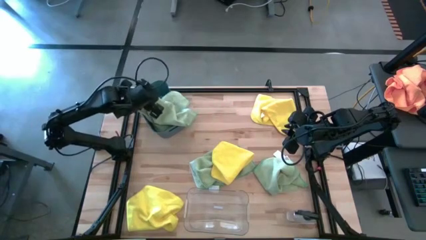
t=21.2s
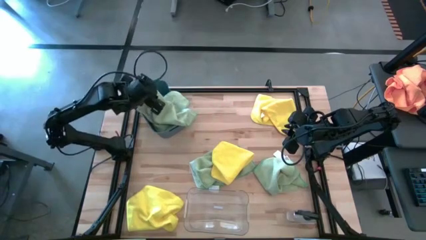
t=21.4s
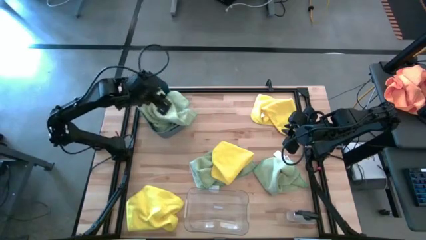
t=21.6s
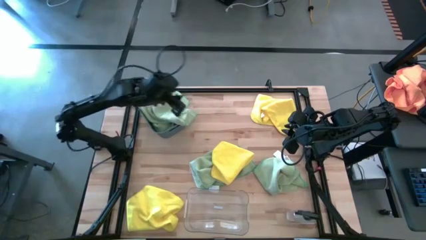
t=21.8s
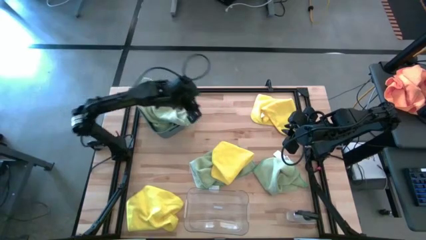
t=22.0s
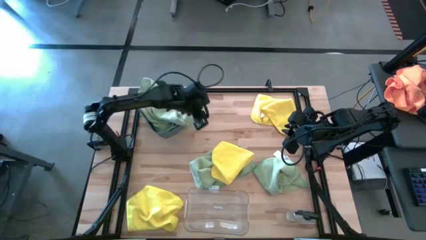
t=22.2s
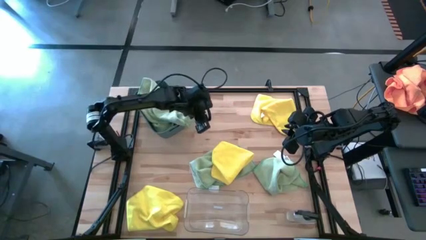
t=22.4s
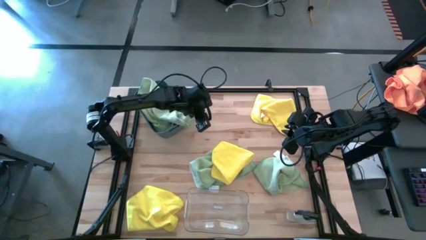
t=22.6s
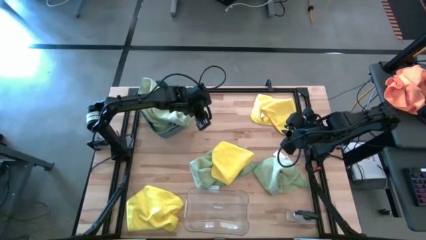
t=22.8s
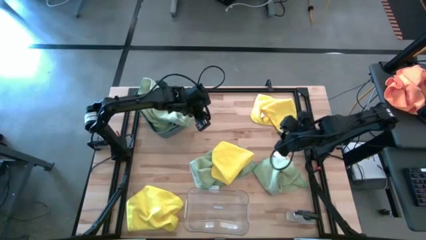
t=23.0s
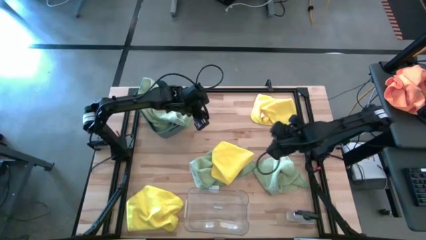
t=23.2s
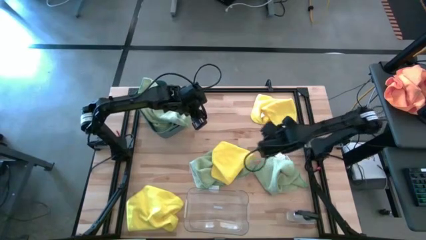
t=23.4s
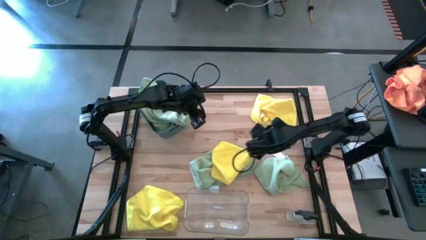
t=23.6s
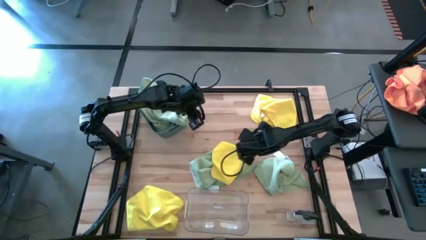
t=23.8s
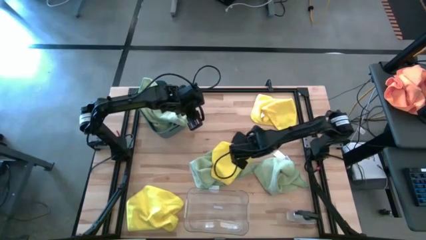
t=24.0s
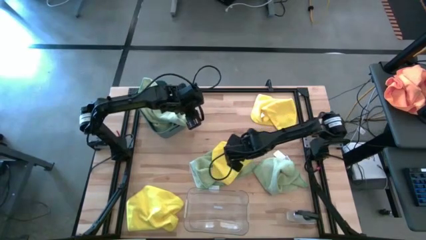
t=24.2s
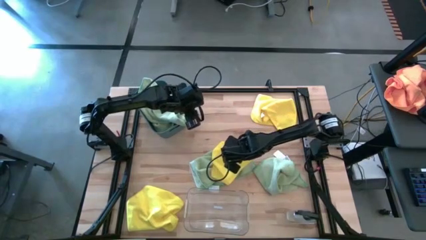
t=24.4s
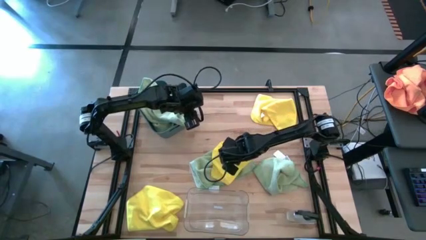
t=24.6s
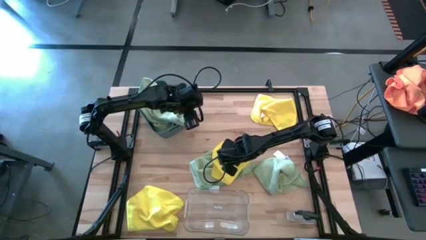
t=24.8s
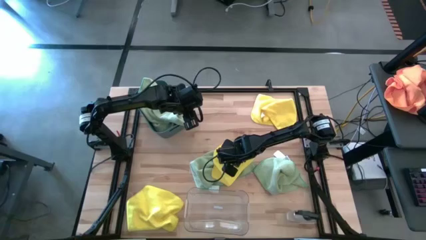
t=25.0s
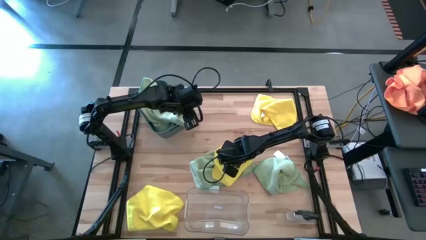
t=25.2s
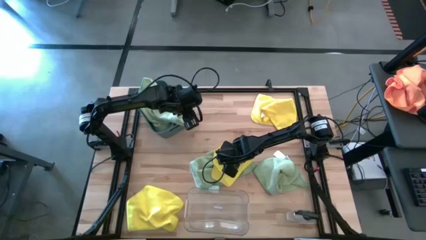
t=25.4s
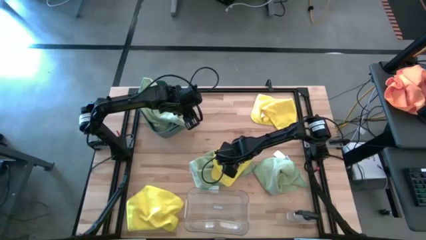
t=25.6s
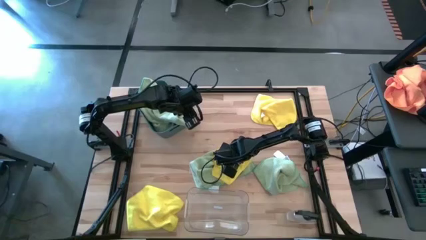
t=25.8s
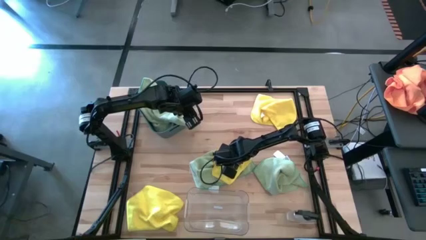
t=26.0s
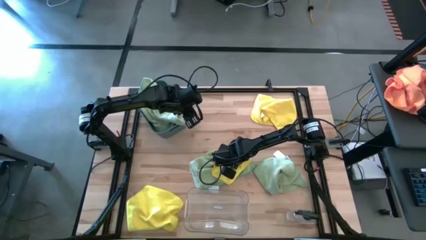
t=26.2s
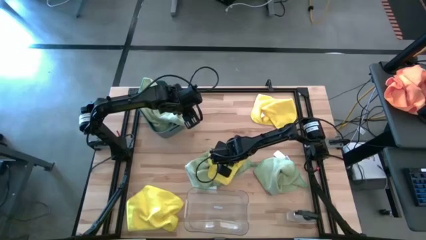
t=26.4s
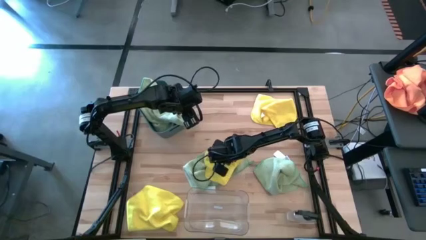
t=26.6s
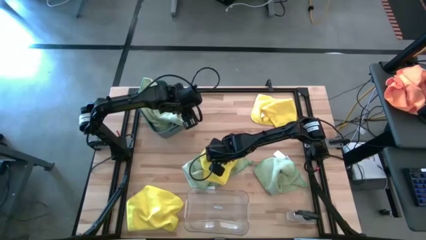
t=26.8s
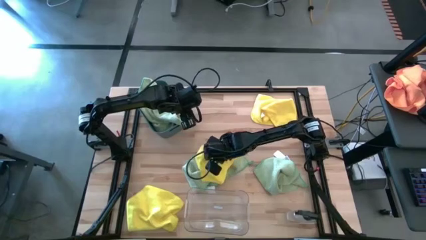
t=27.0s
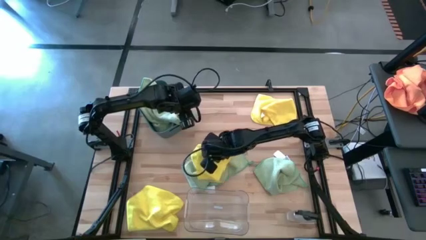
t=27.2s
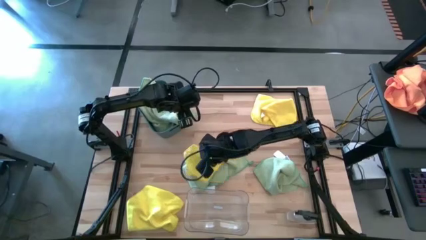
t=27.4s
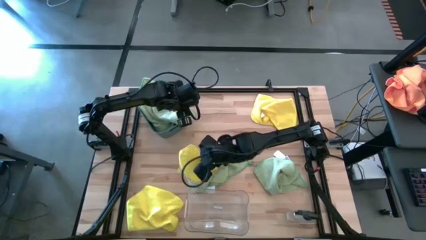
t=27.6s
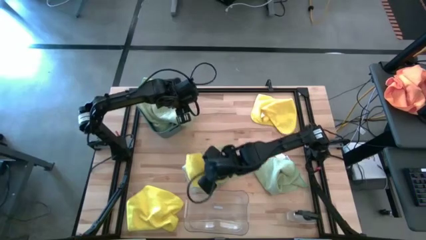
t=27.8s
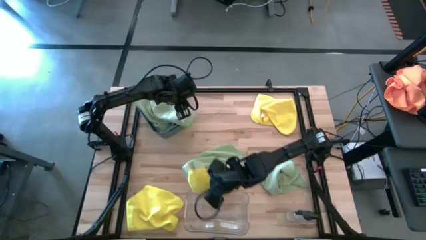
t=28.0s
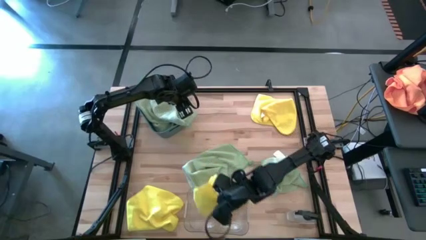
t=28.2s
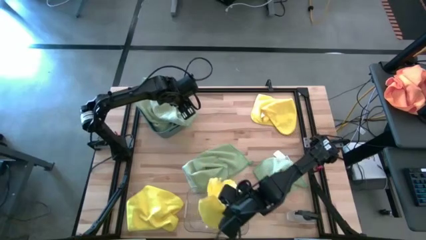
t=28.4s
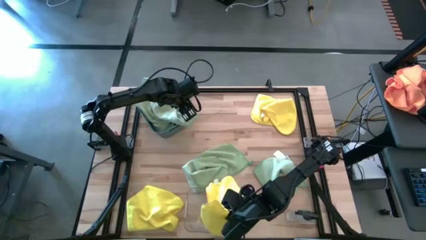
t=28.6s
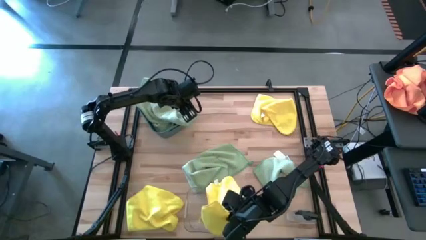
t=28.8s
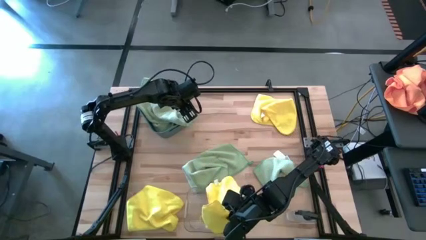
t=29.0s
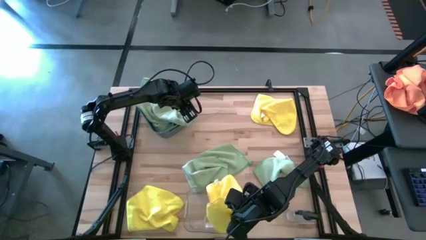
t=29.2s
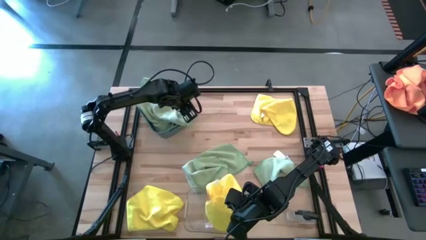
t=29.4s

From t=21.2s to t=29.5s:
Task: Sort microfiber towel by color & place in baskets
Put the center yellow towel into the transparent bin

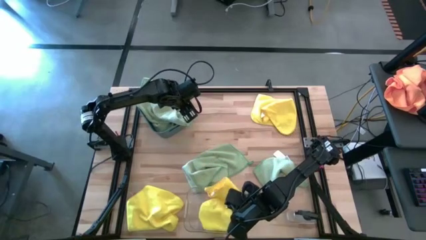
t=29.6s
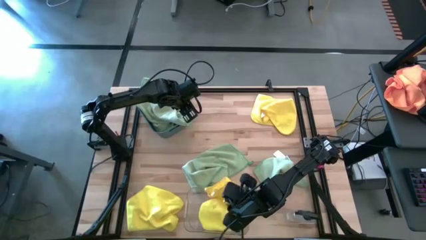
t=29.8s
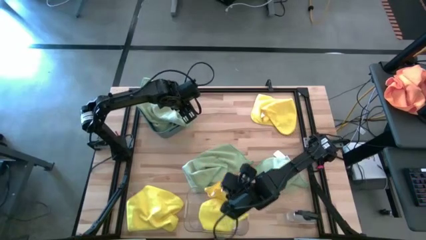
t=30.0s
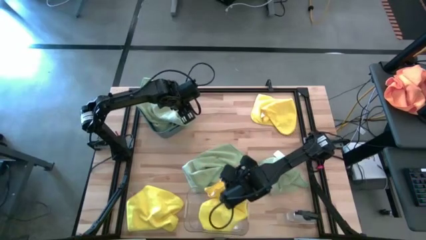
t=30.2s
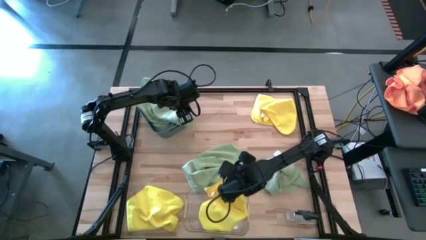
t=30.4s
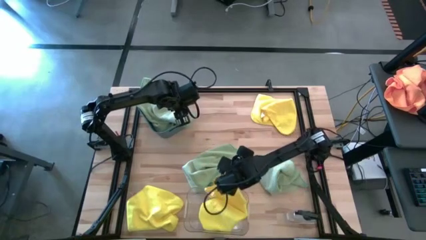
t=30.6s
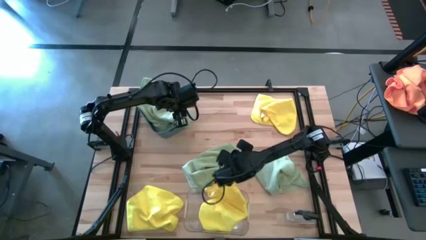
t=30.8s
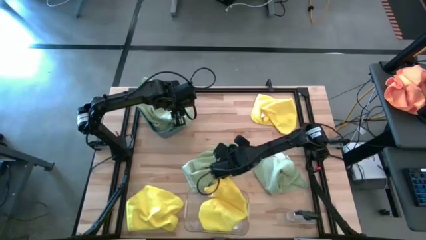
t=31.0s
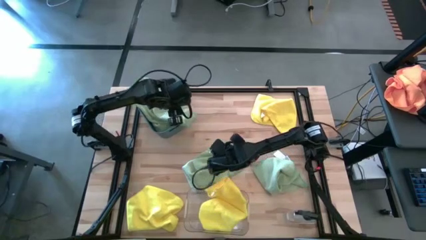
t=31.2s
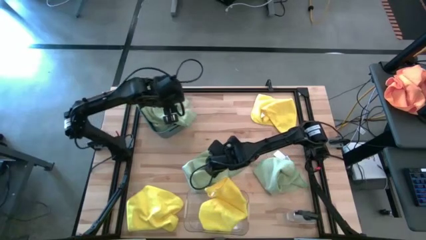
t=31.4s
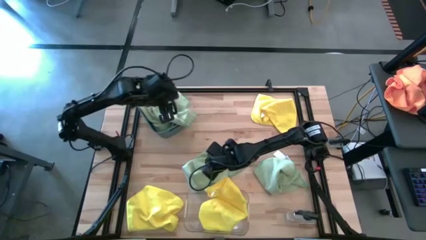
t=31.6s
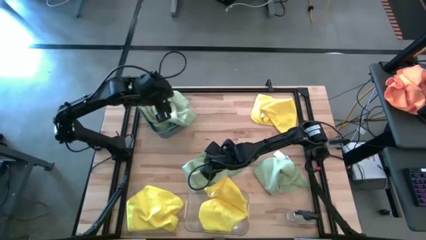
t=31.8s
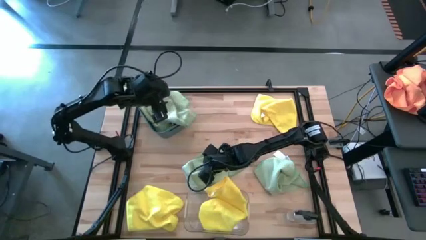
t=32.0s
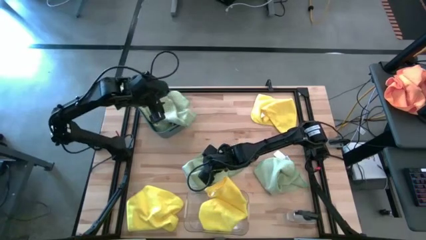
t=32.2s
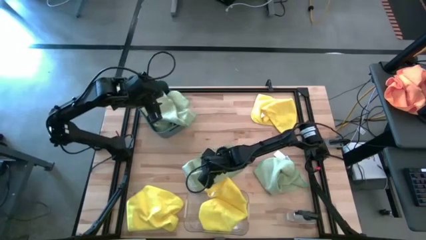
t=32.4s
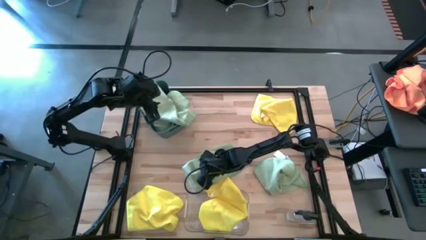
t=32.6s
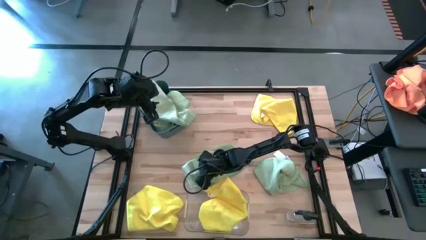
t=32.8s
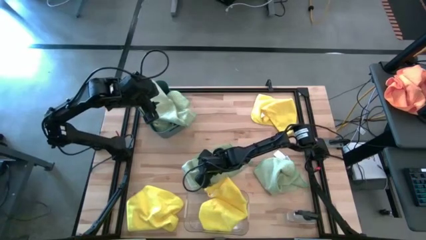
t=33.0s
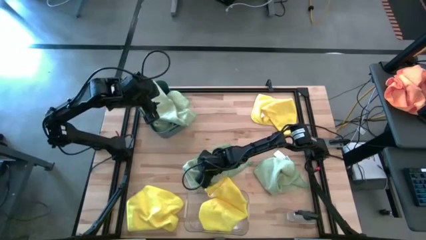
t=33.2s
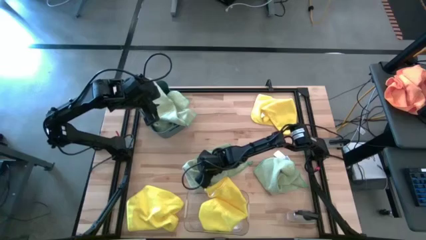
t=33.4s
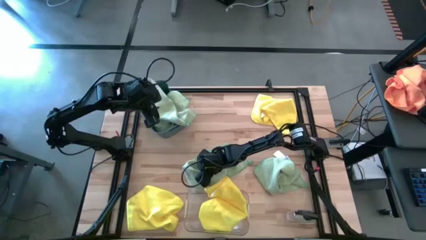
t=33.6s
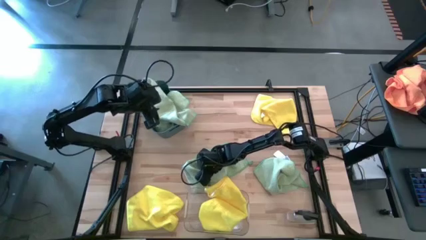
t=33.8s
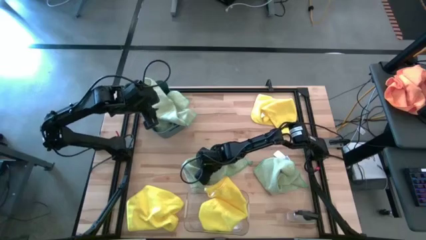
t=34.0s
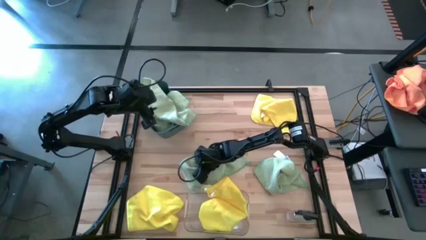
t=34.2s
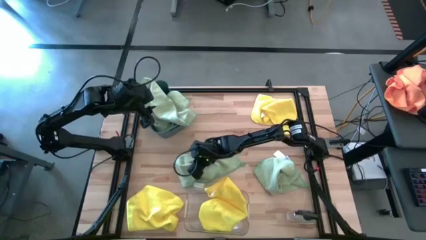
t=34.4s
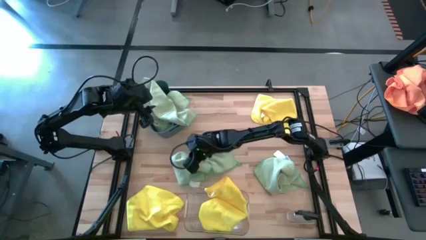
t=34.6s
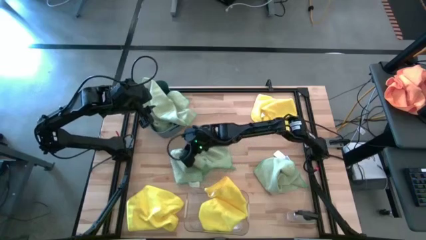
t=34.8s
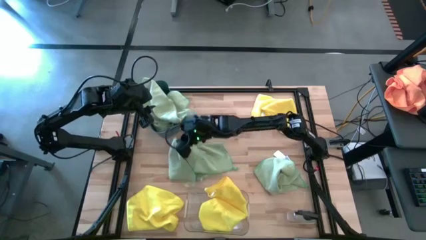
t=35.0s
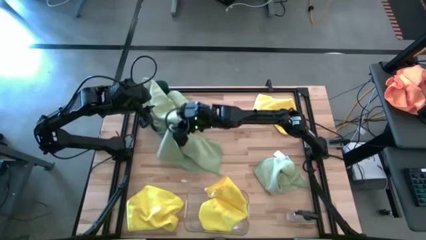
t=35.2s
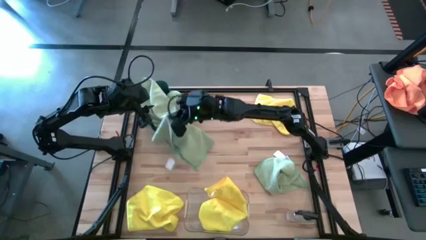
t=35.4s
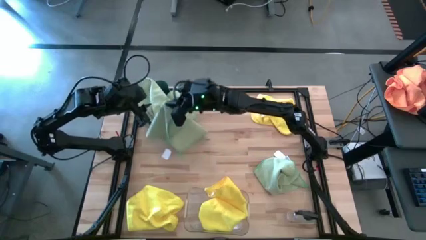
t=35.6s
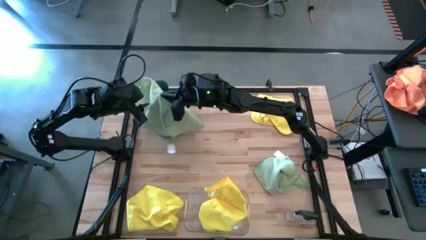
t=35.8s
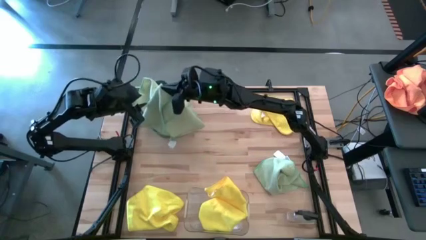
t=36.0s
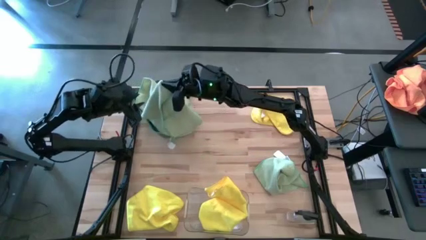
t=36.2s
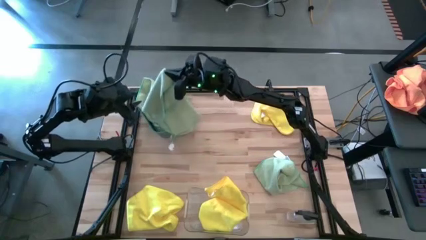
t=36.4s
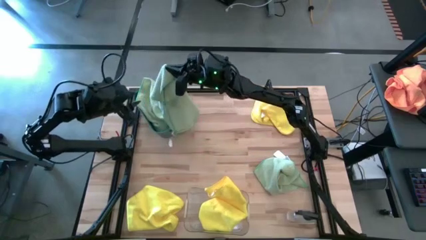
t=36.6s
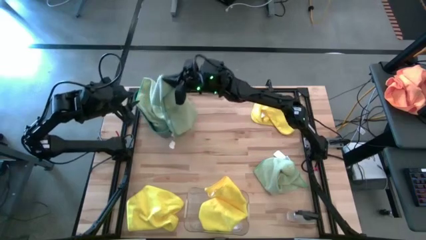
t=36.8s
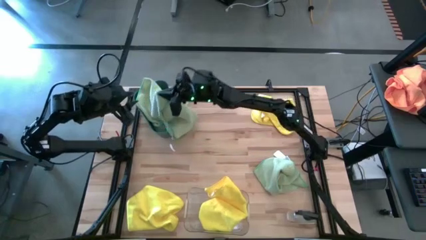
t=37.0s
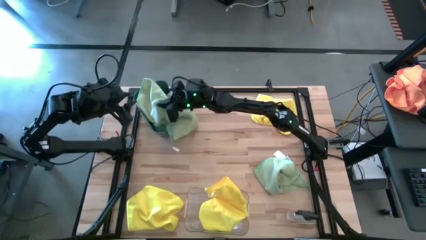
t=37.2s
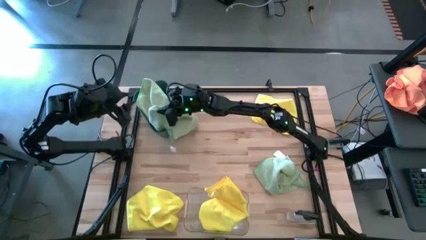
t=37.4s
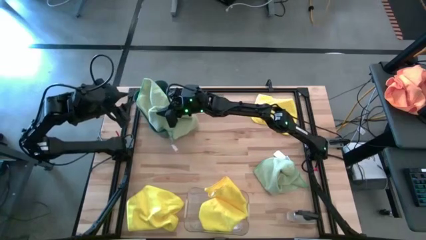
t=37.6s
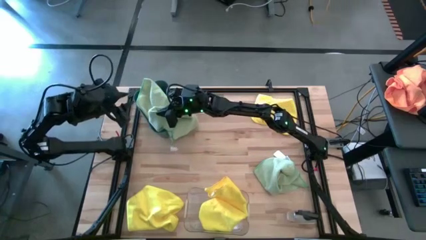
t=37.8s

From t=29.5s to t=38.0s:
Put the left green towel into the blue bin
